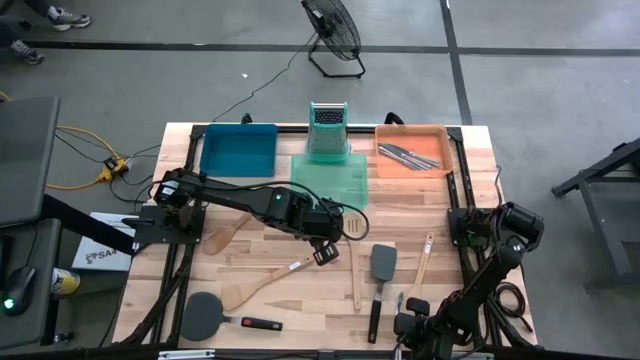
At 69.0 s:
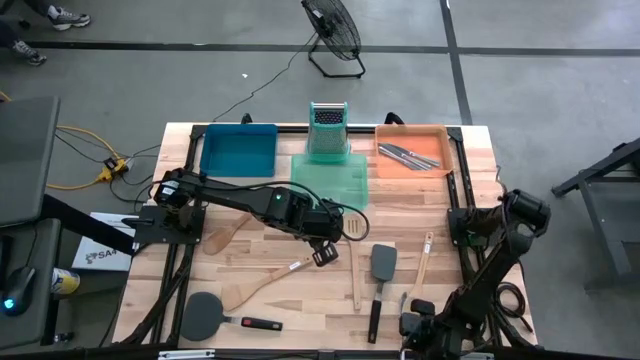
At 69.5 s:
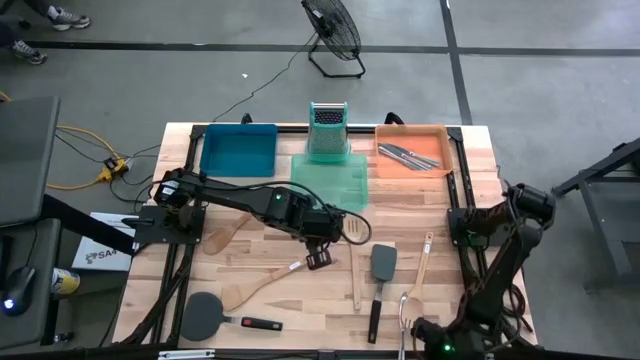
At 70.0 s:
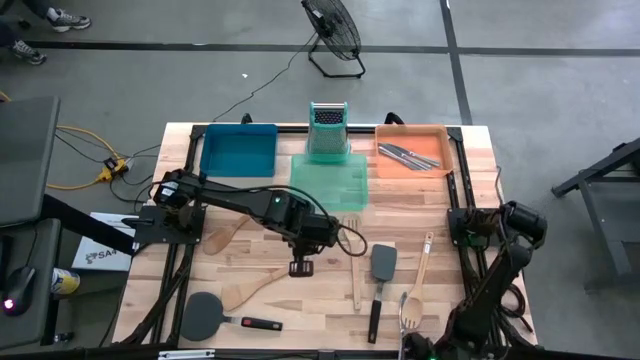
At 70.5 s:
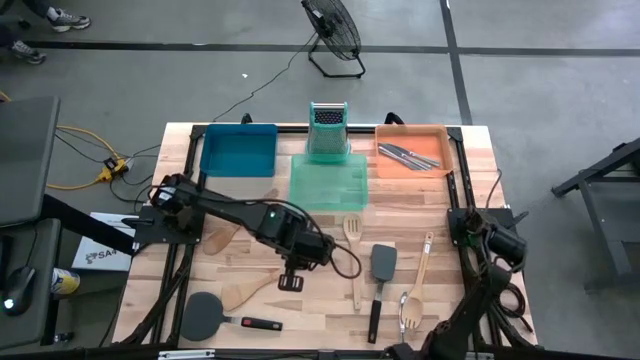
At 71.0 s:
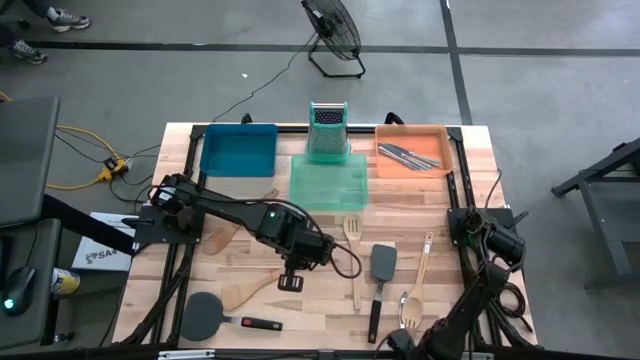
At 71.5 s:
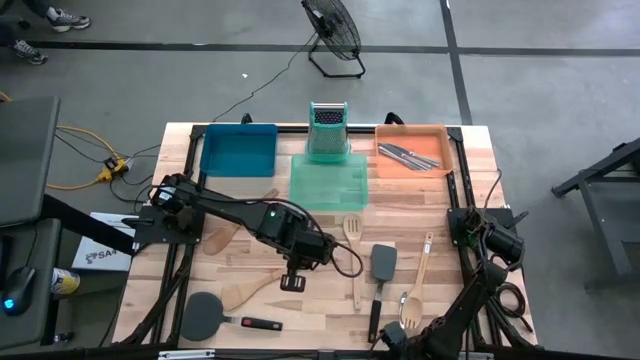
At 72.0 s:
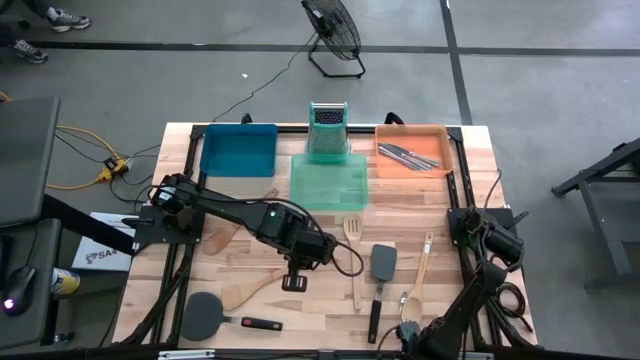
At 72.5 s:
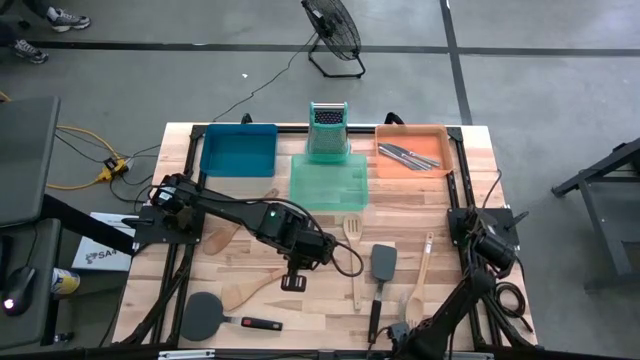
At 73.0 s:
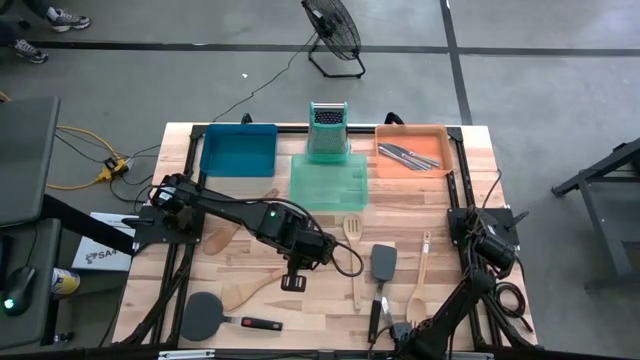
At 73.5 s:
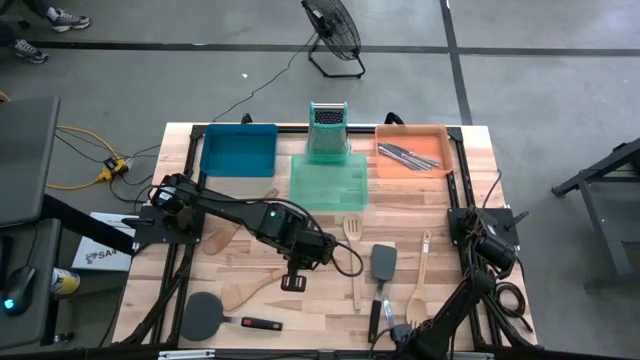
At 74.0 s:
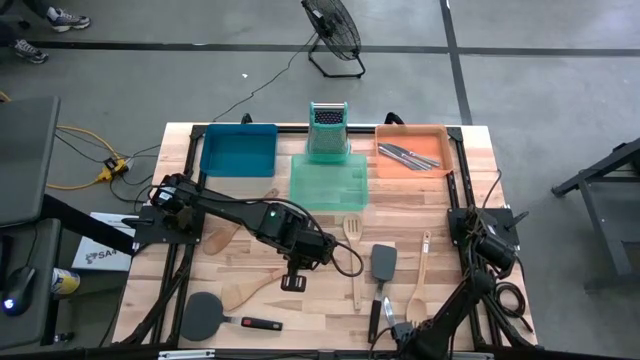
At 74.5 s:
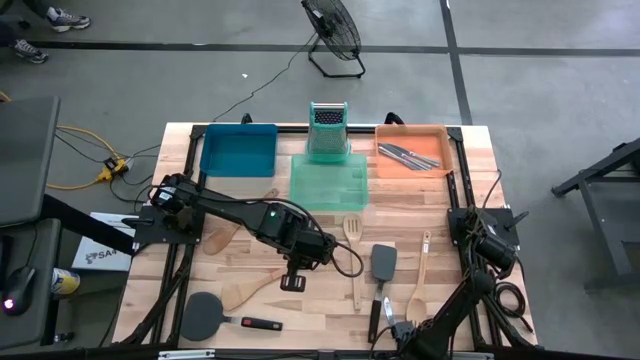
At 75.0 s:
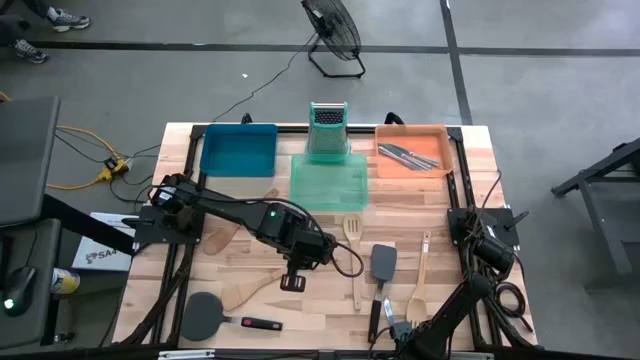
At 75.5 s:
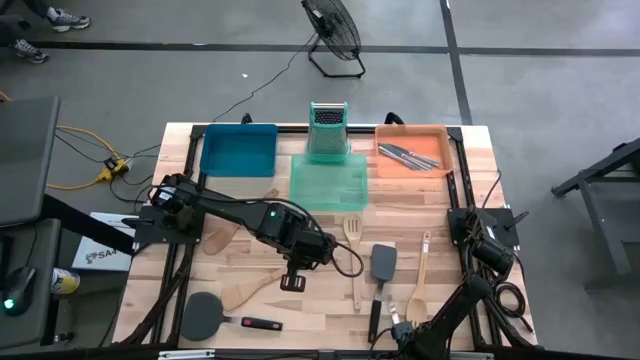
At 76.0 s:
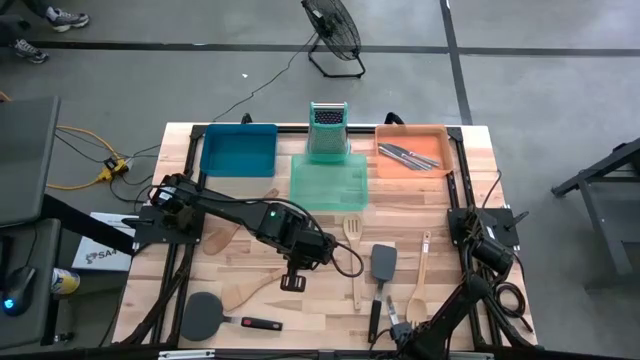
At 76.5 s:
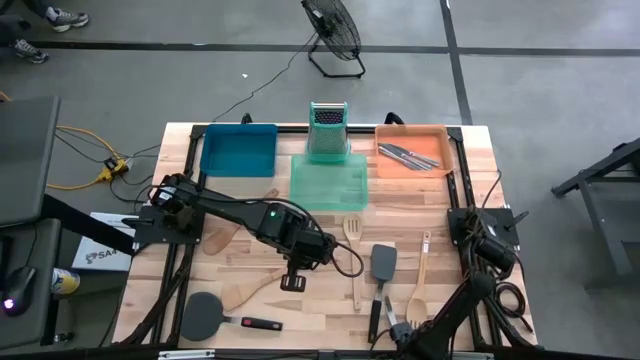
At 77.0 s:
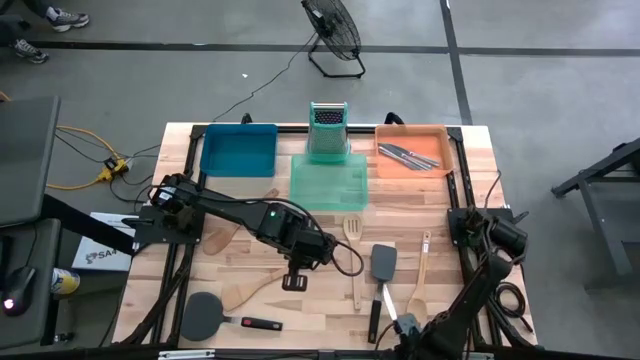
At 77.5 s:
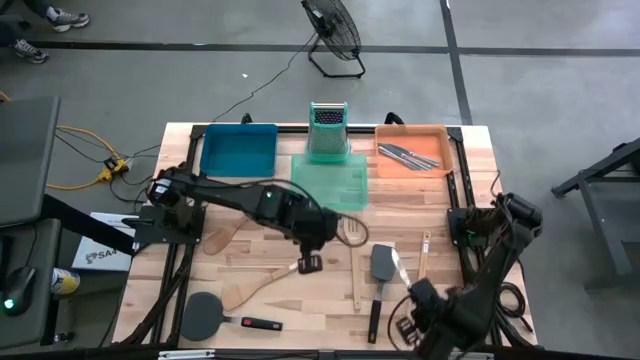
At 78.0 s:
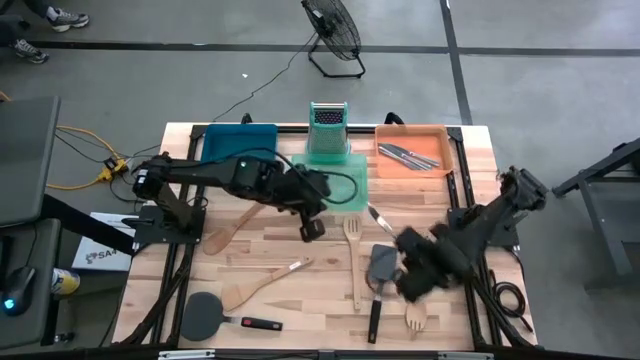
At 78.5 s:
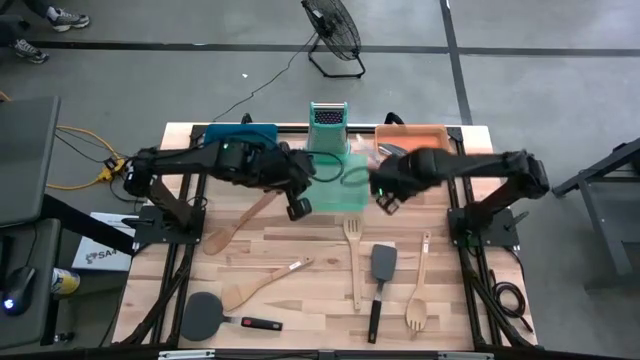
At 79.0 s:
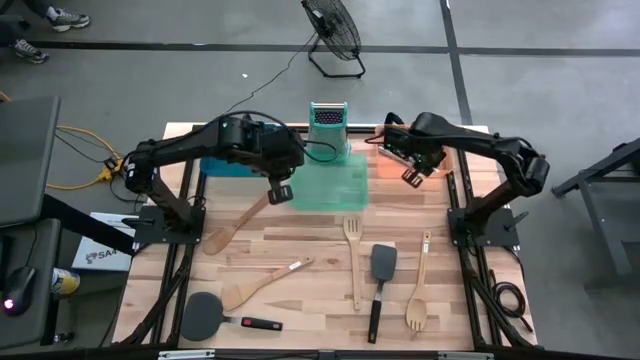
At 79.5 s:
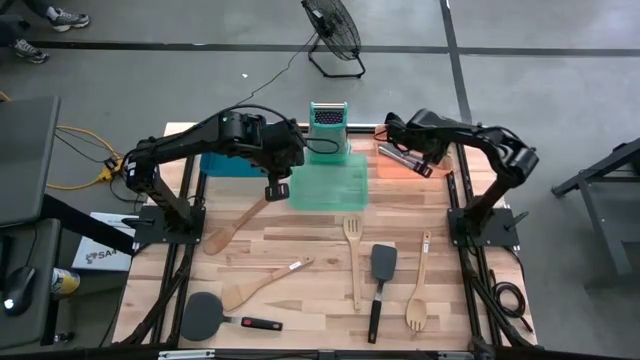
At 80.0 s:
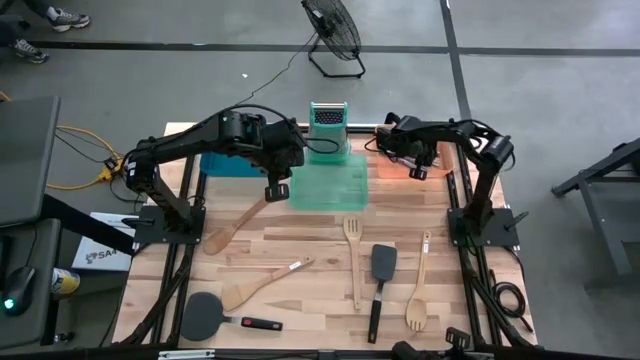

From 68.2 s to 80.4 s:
Task: Pick & Place Kitchen Items
Put the silver knife into the orange bin

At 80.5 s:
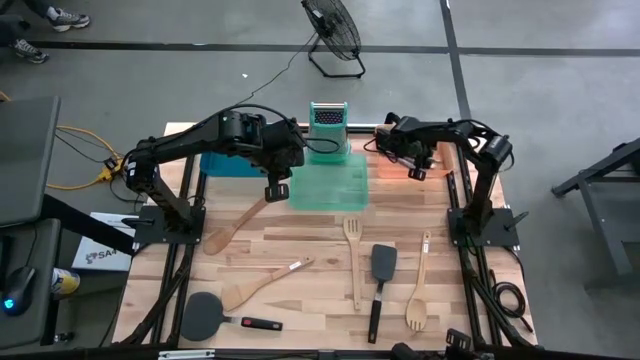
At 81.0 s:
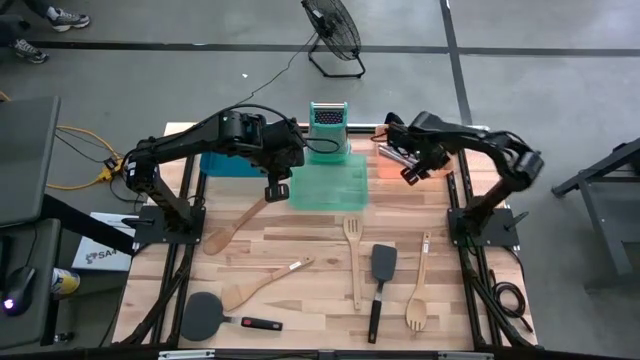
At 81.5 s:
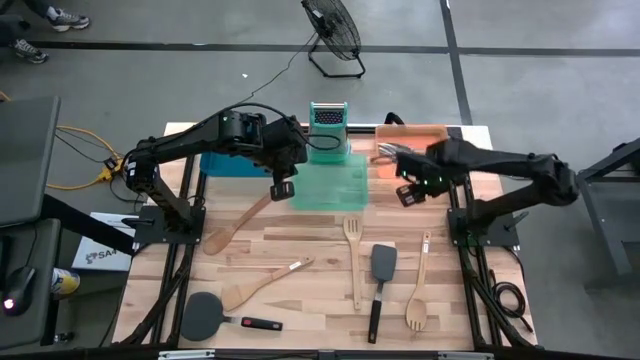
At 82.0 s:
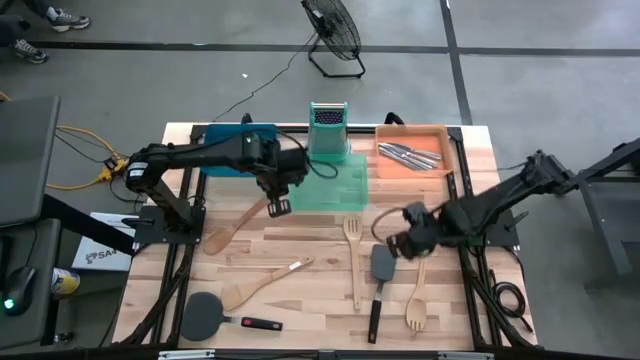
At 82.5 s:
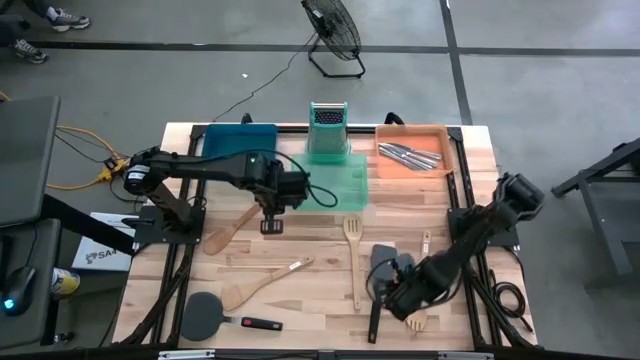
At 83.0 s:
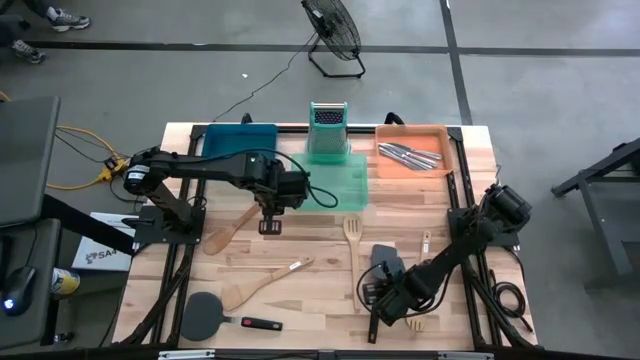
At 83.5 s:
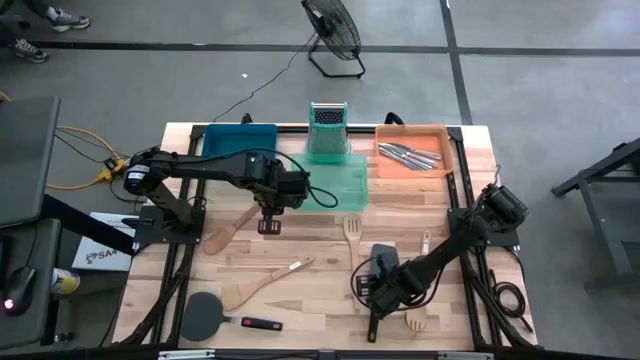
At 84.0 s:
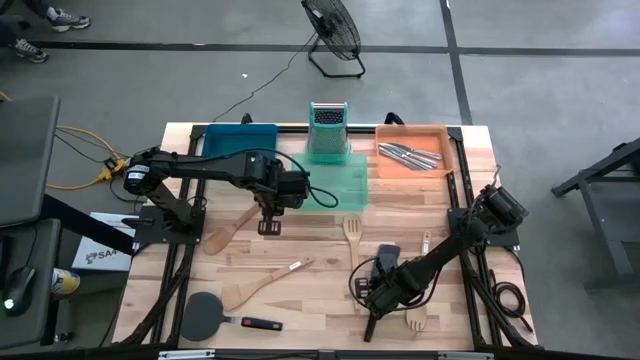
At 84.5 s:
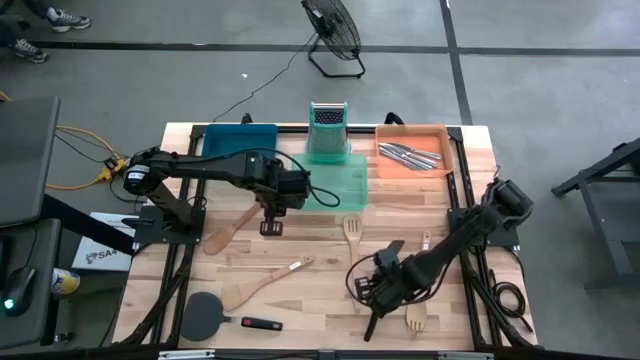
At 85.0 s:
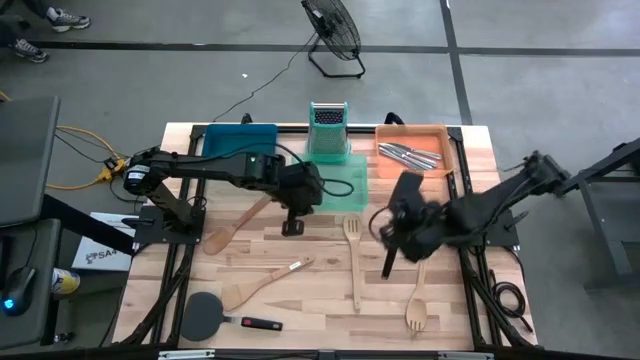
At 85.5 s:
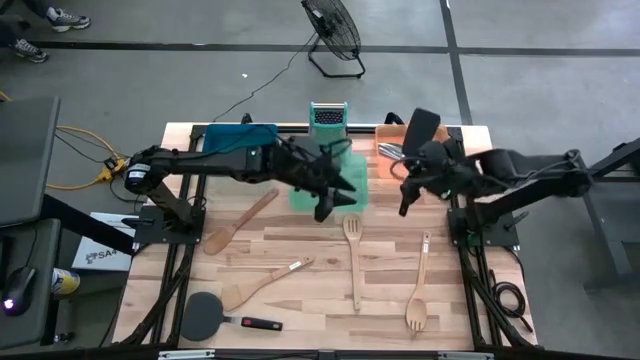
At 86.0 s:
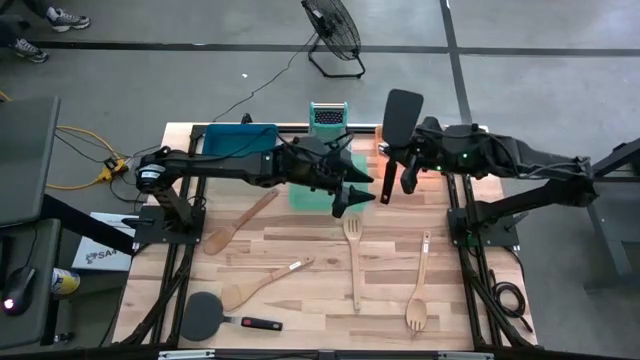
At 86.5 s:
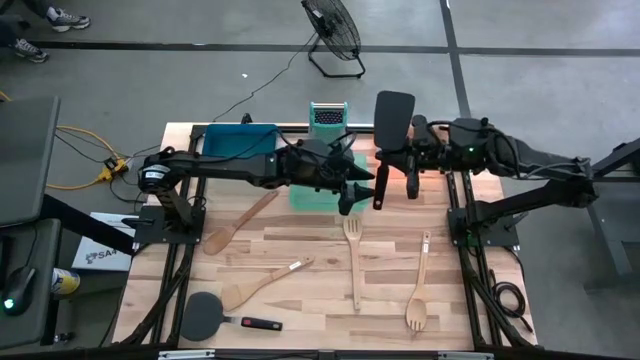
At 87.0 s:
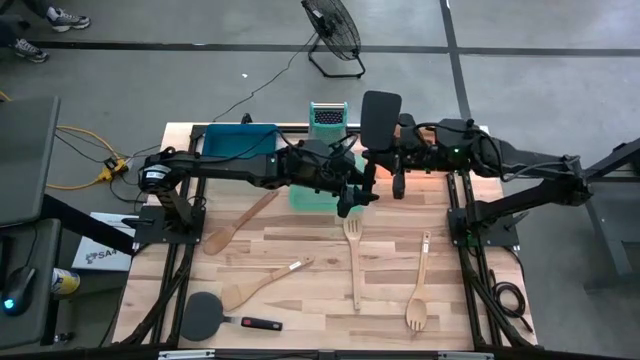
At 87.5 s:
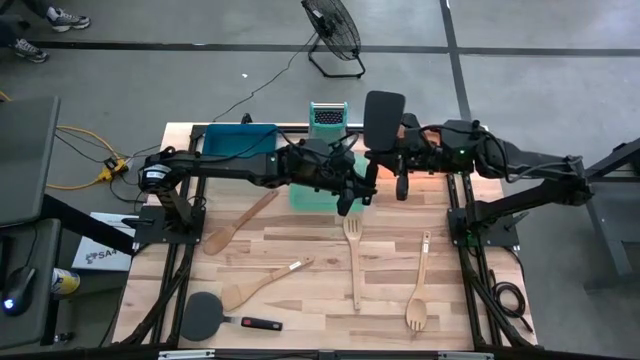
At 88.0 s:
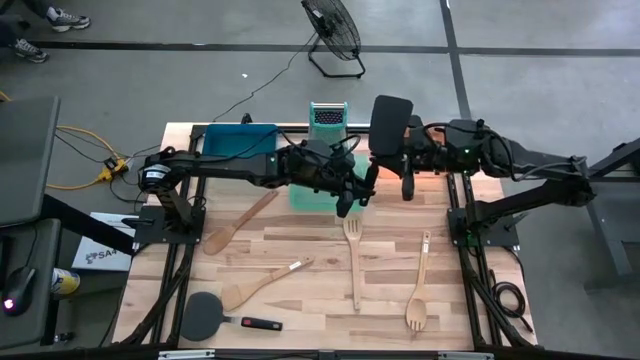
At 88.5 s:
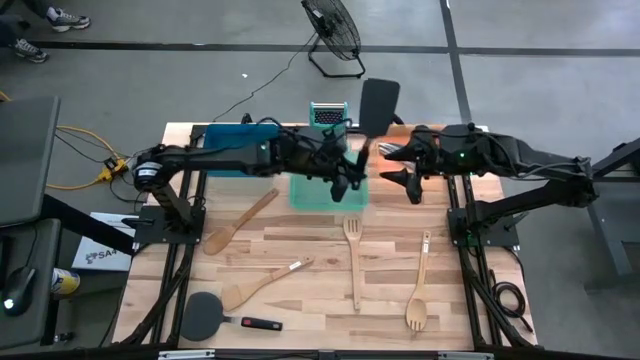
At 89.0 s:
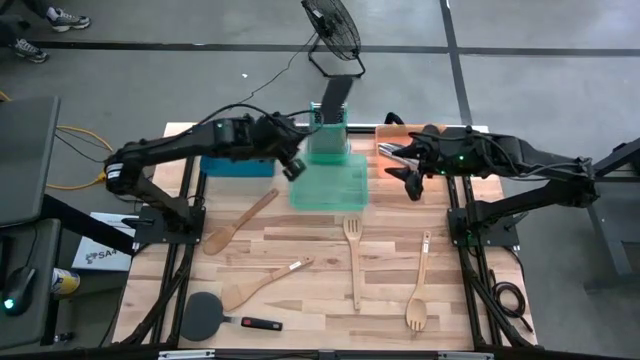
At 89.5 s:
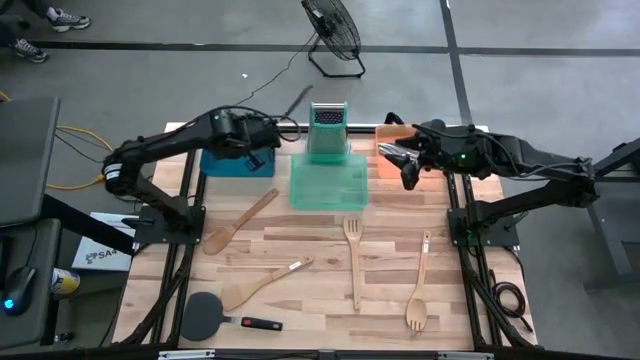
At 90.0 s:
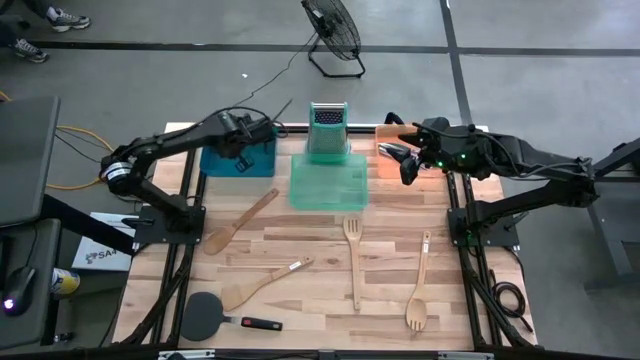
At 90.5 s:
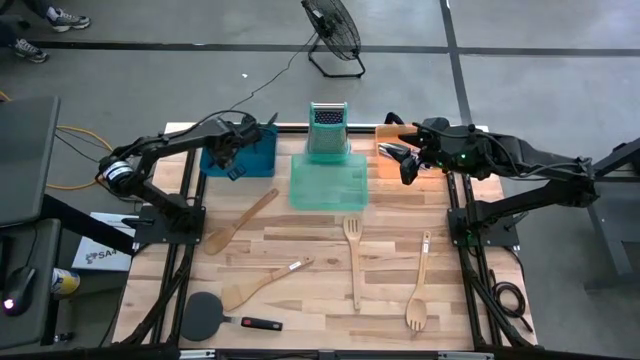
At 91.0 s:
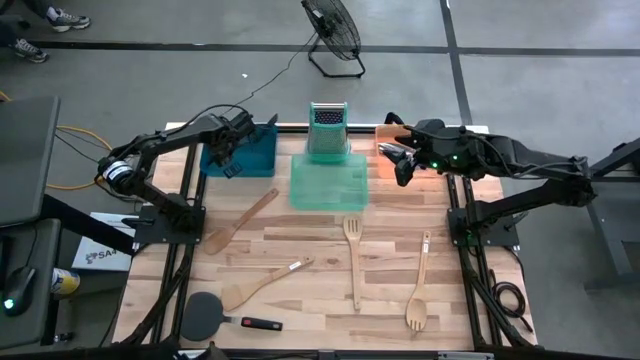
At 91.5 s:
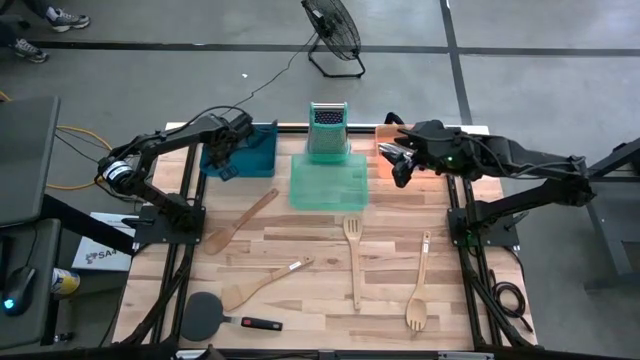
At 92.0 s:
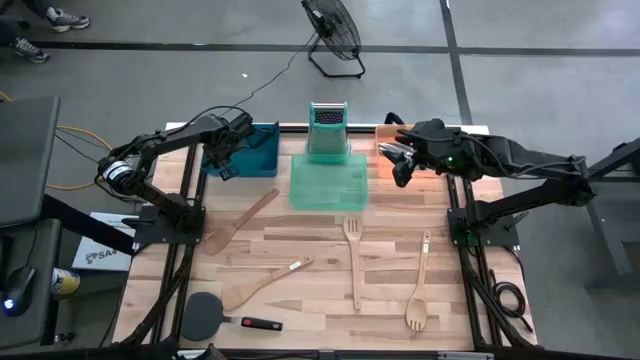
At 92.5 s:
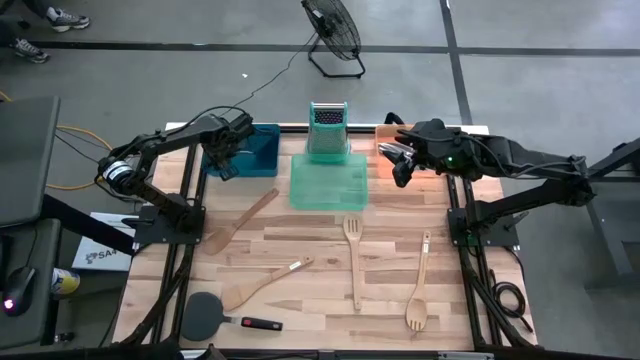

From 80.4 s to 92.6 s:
Put the black spatula into the blue bin
